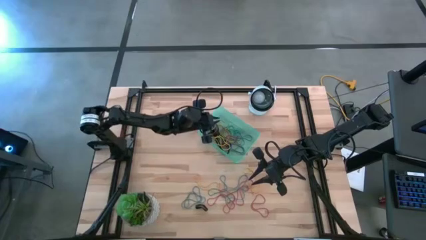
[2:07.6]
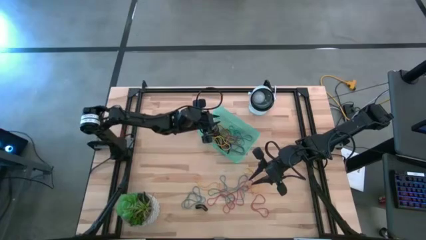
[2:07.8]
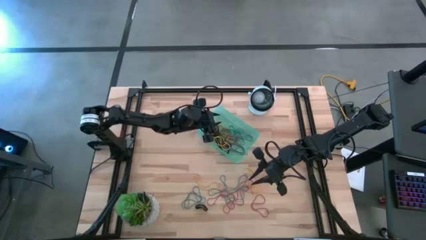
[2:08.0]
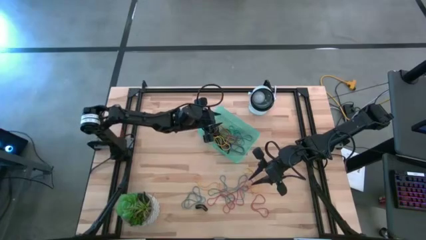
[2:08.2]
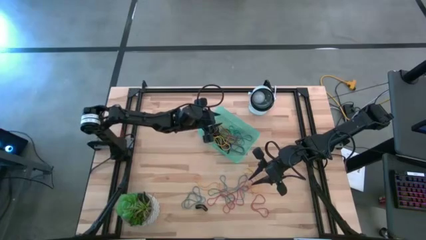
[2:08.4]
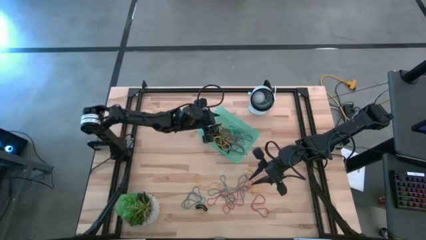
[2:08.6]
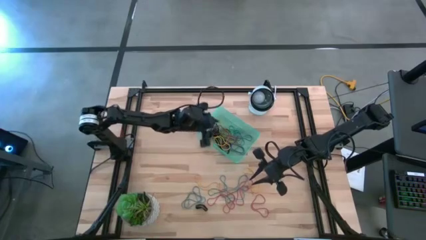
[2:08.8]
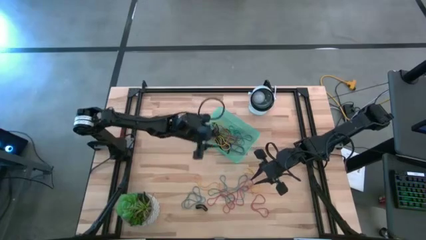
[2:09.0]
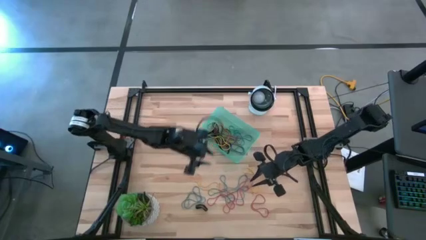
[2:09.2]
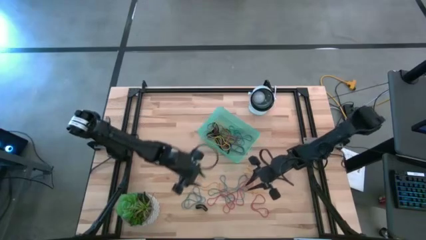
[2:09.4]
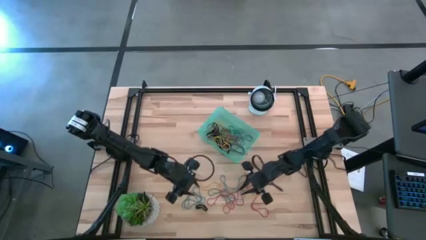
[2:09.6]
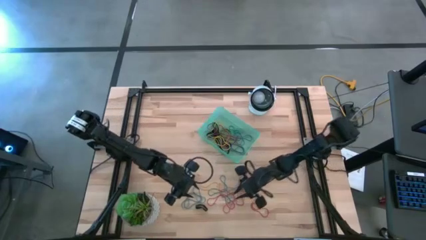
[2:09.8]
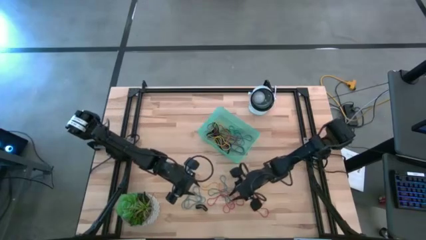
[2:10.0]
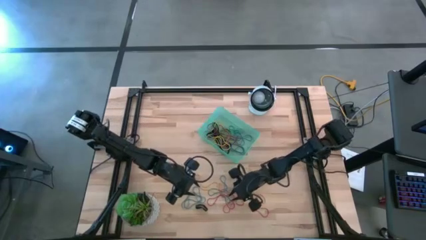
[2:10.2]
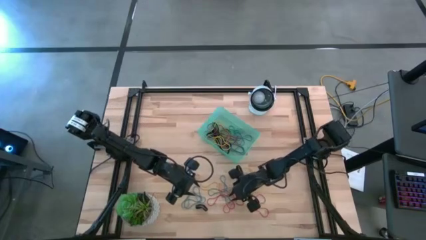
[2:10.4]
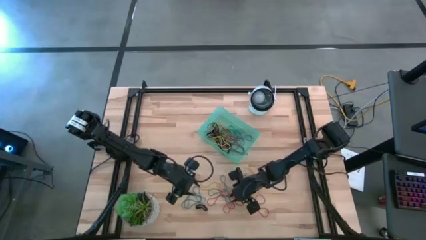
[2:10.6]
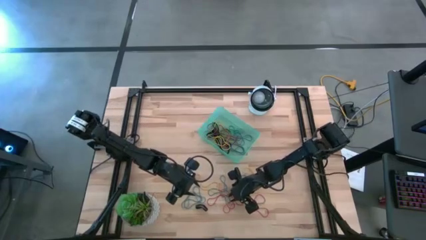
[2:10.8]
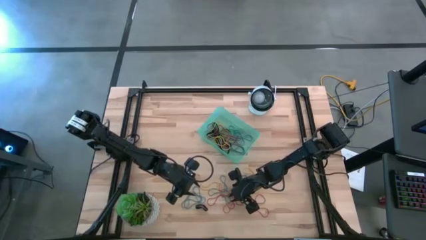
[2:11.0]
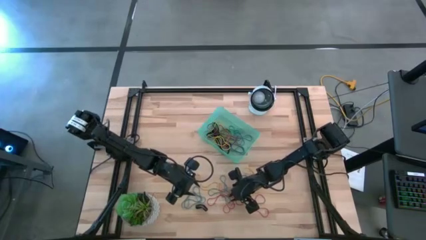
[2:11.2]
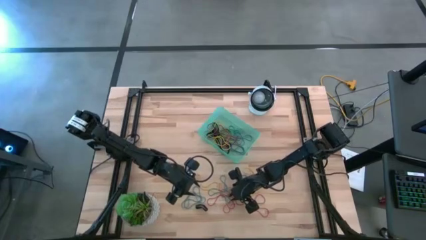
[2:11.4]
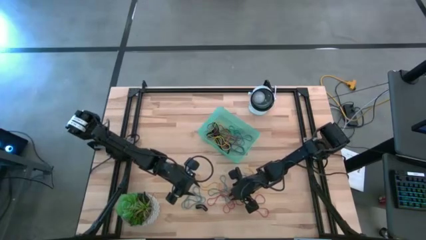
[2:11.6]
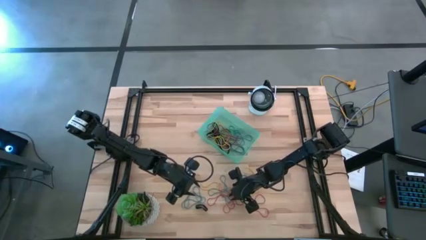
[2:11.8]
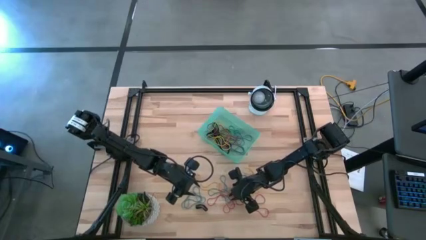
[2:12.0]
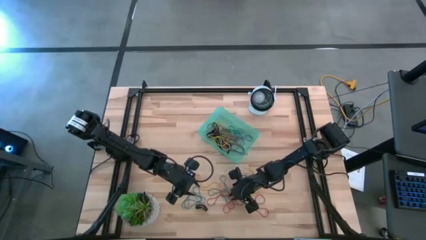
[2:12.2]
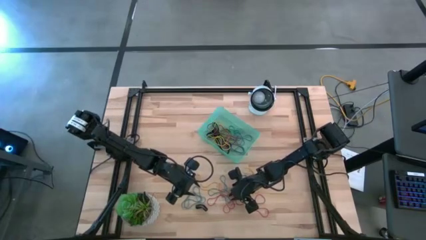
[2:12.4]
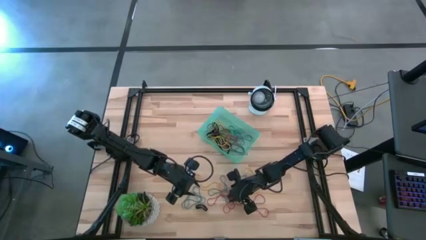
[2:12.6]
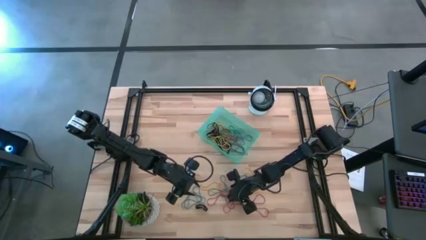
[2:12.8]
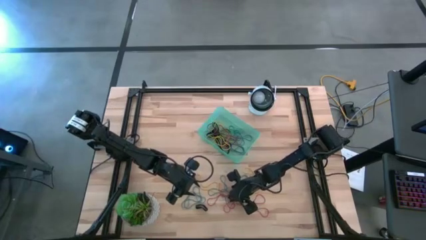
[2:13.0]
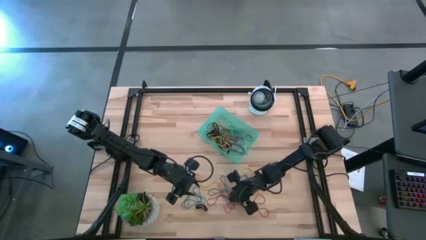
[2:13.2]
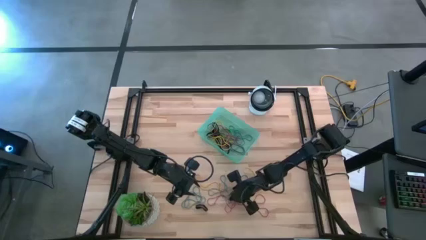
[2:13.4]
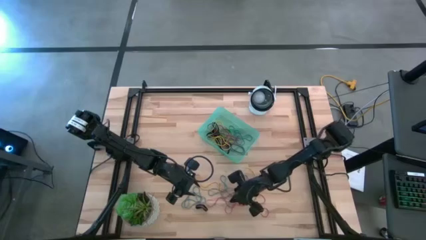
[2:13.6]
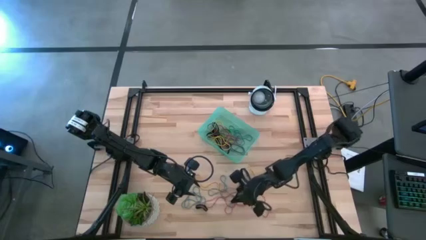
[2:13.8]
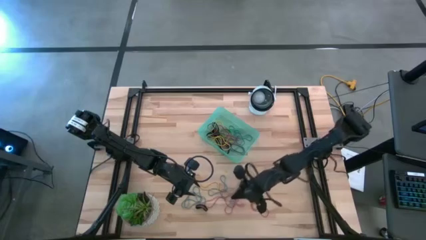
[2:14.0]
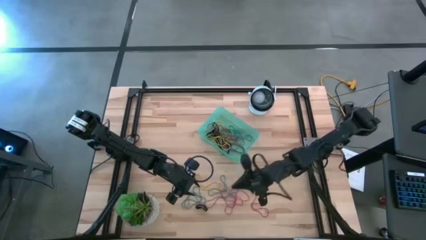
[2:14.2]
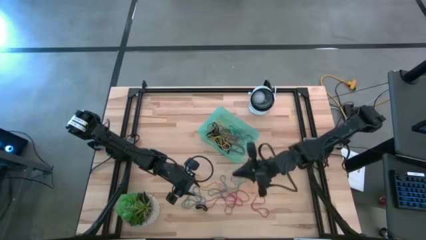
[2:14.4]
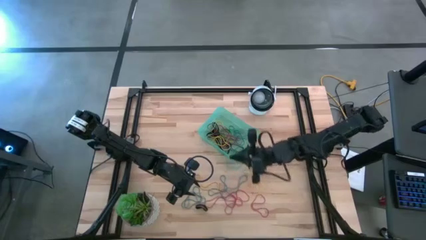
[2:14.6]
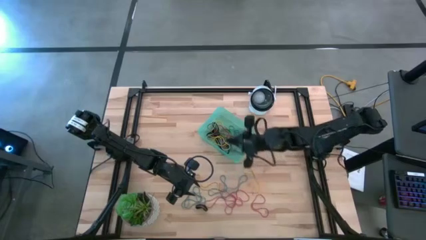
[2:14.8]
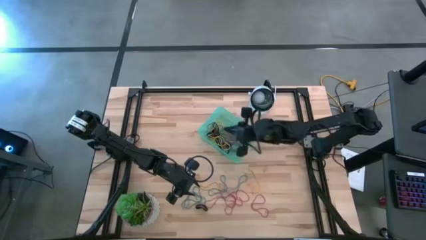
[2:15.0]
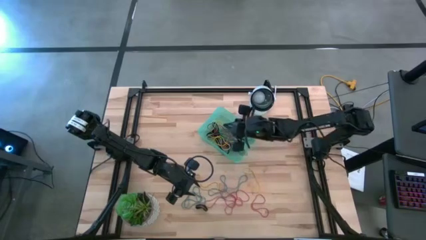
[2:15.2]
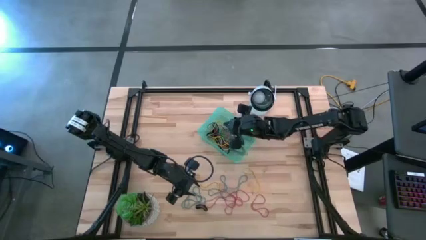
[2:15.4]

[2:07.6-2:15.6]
Task: Pick and place rubber bands into bin
Put the blue rubber band into the blue bin

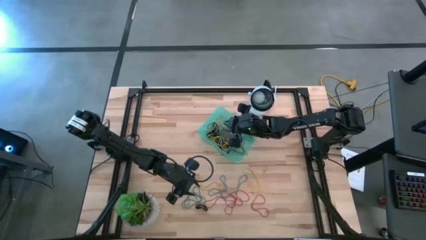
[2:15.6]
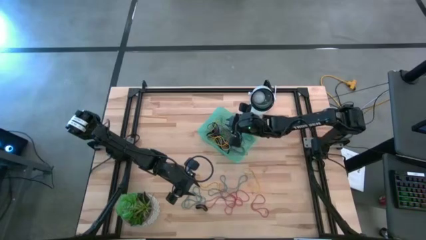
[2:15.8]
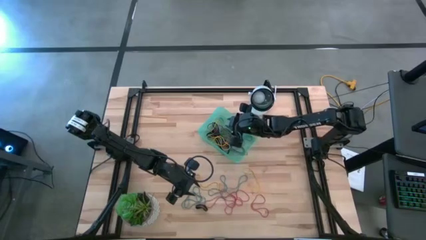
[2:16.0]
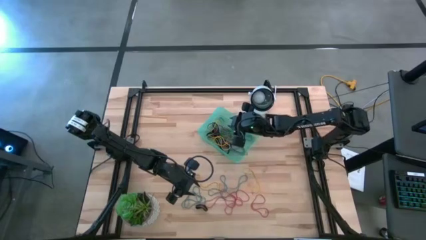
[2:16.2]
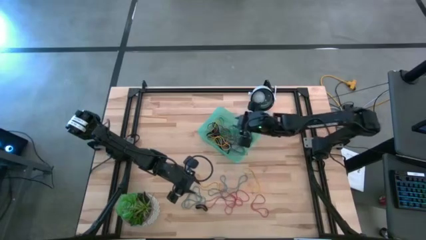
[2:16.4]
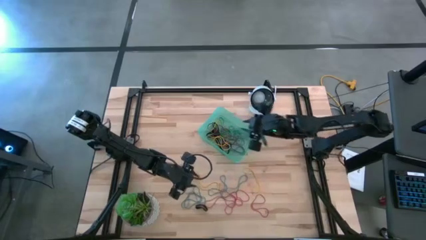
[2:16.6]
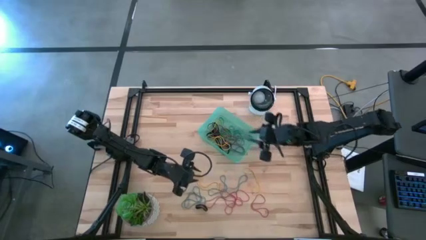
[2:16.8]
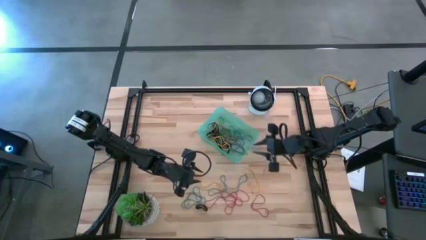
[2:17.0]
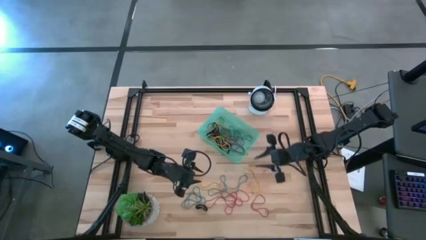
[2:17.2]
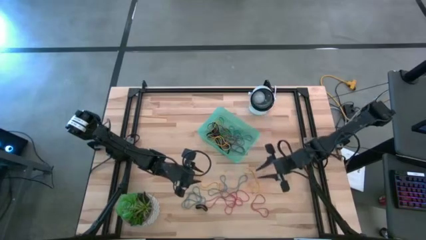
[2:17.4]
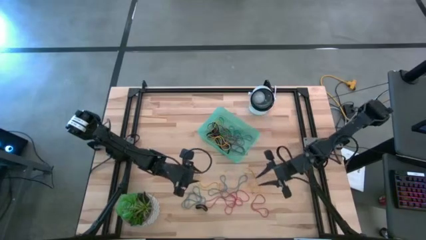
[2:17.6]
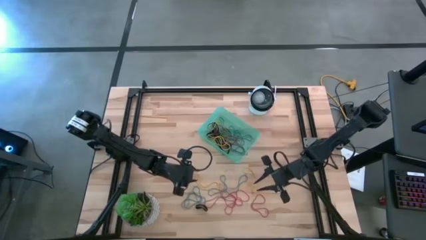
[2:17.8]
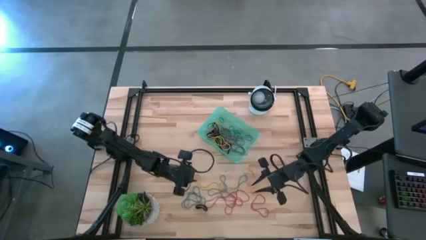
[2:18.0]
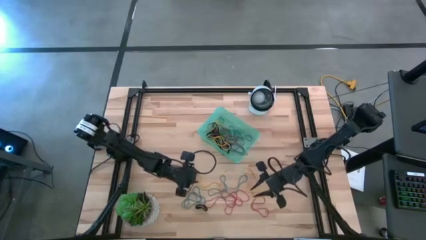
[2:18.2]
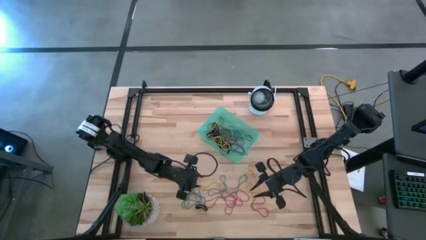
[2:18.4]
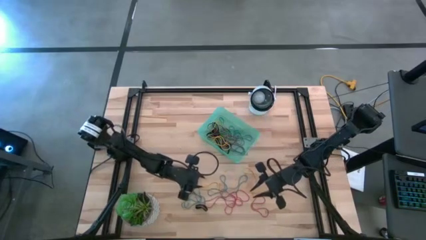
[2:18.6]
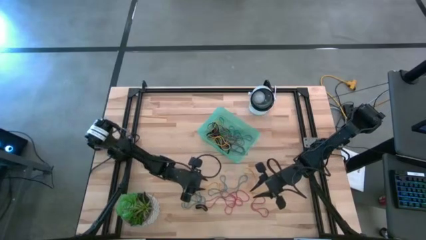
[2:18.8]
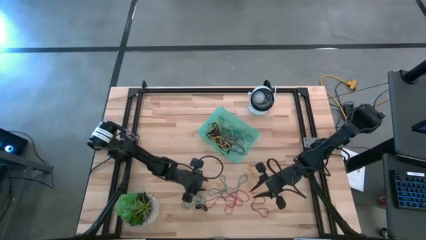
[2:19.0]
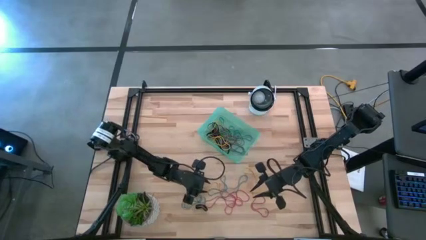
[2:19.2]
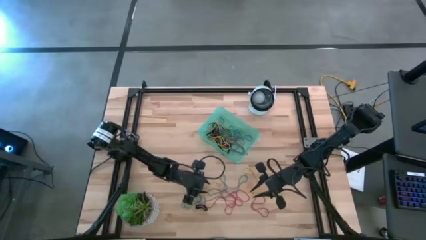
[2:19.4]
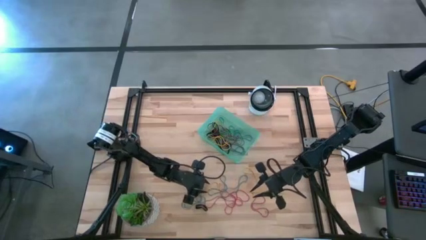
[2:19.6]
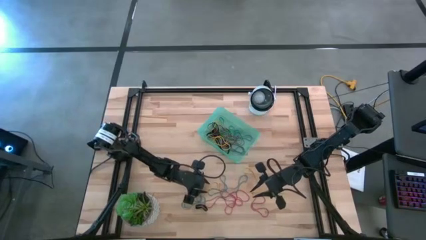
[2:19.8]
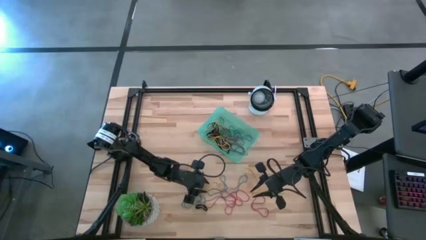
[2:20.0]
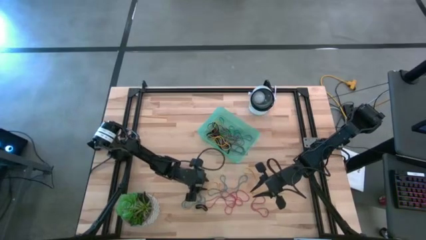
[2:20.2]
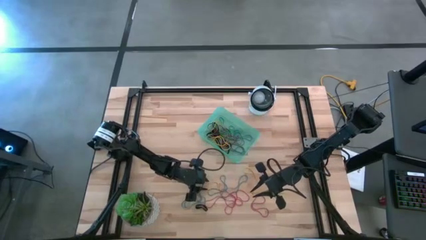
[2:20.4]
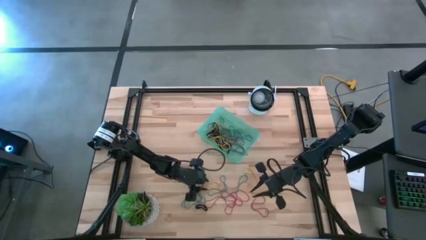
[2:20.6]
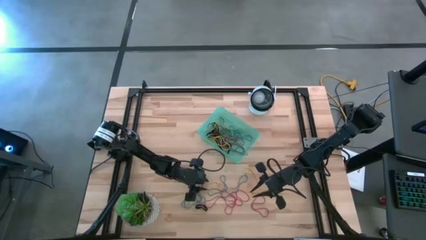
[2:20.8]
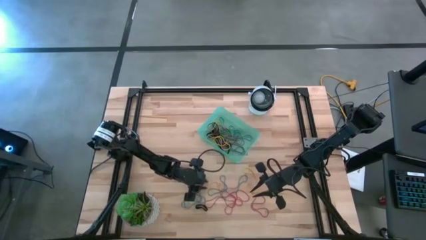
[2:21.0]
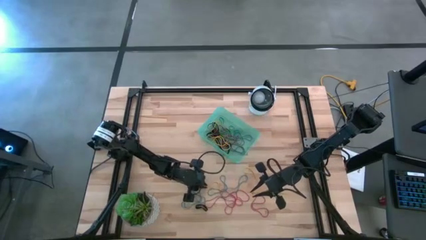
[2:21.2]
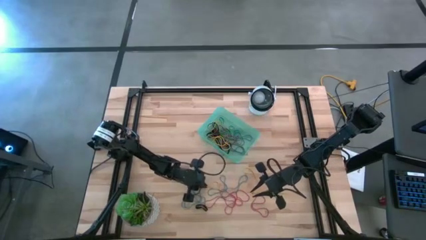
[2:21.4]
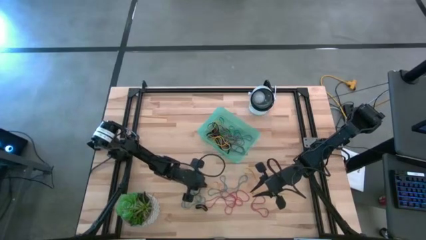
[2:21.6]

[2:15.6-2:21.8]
Put the yellow rubber band into the blue bin

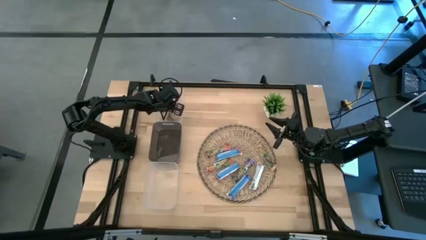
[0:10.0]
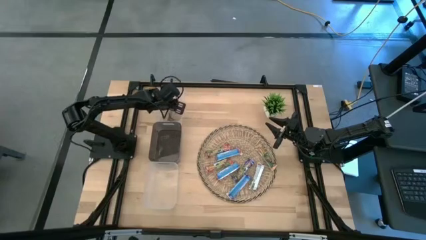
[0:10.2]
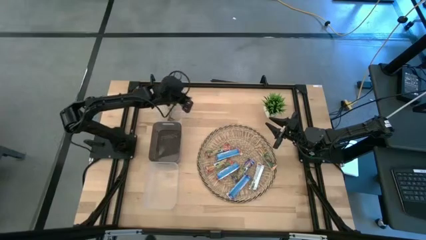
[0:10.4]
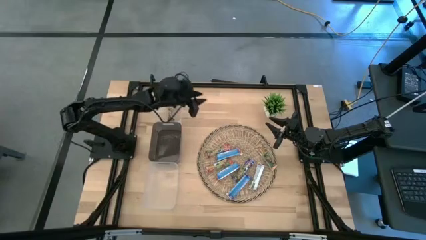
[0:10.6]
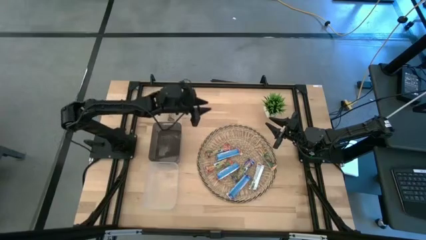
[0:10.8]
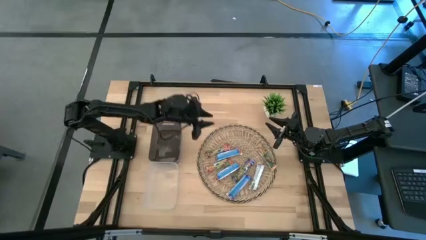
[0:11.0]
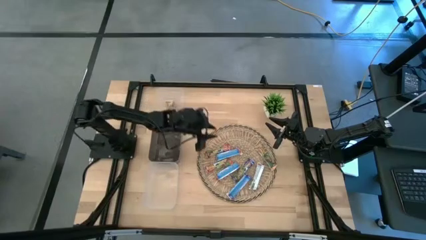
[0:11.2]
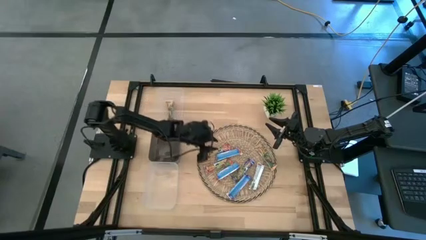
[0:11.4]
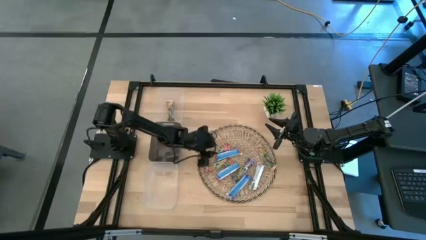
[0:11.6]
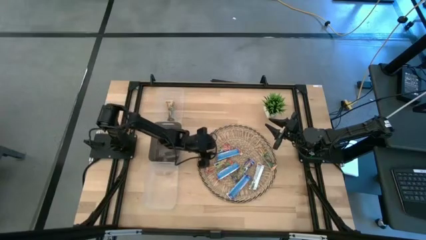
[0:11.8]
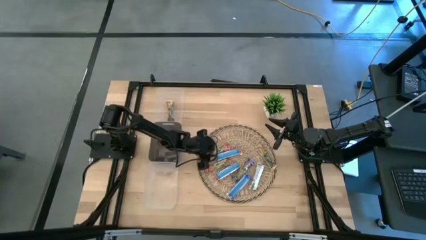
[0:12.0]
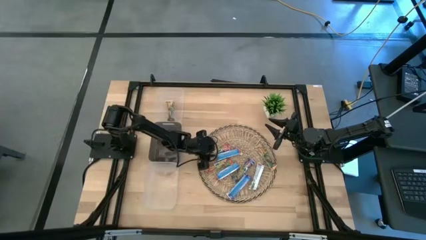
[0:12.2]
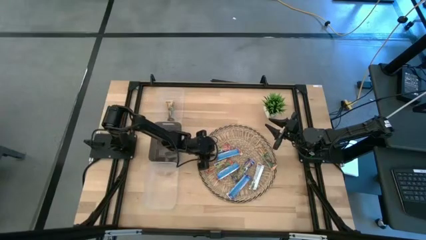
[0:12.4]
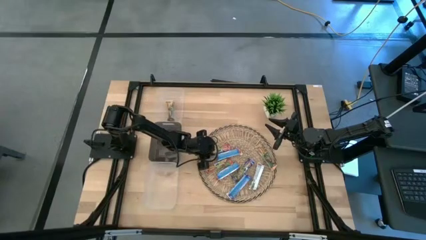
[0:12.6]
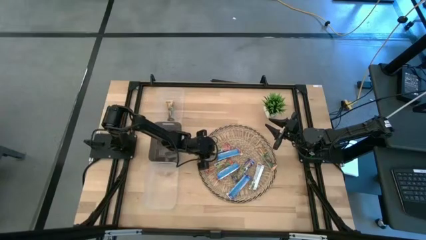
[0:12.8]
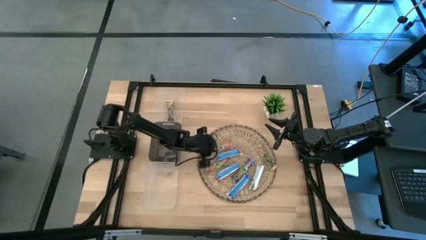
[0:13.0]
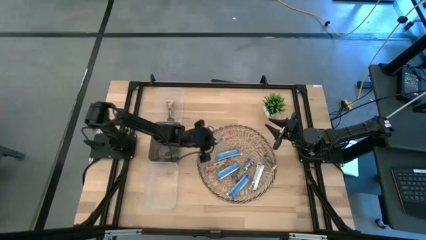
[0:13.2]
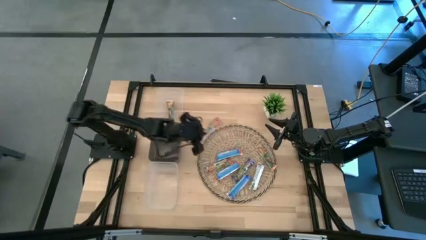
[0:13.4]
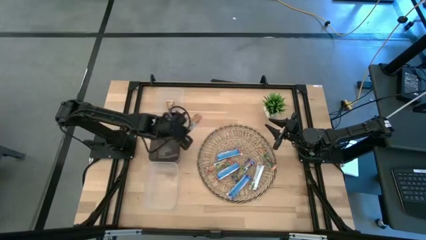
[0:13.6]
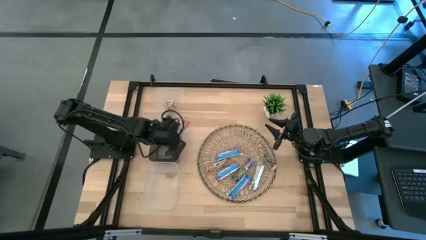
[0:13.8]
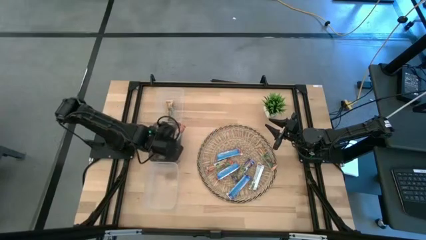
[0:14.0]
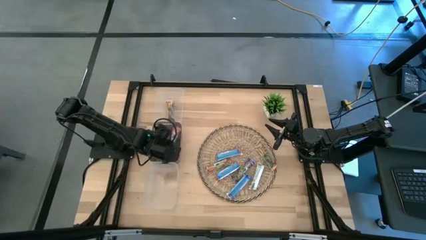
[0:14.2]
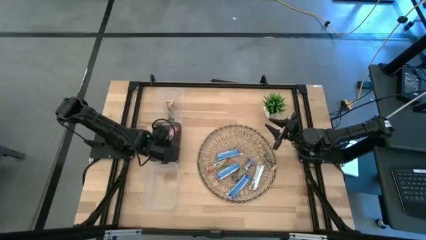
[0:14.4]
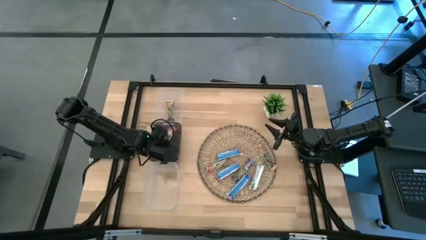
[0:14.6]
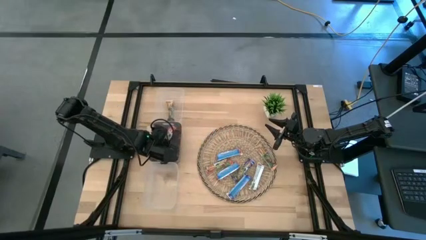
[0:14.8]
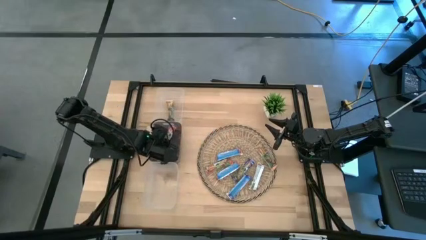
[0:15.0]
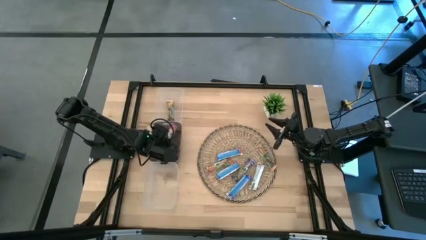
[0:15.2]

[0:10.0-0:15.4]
Task: Pick and place Granola Bars by type
Put the red granola bar into the black bin
